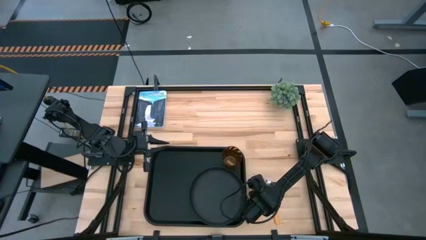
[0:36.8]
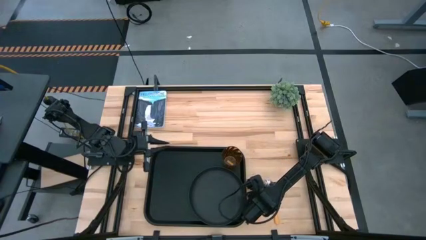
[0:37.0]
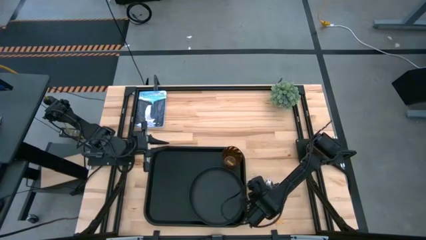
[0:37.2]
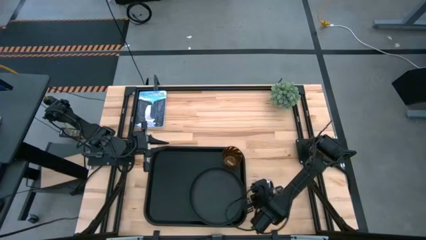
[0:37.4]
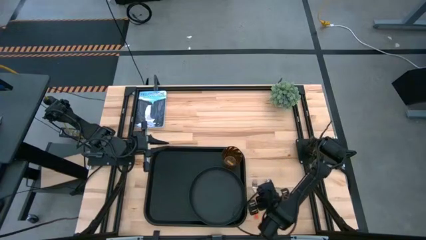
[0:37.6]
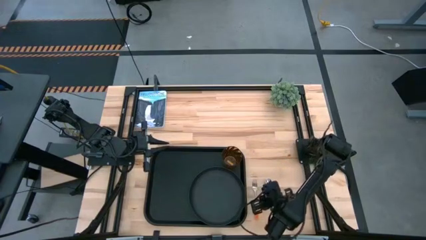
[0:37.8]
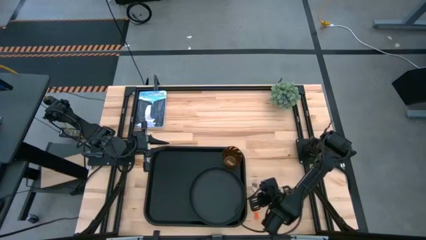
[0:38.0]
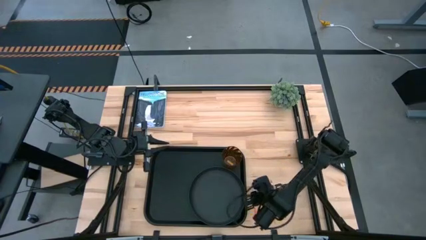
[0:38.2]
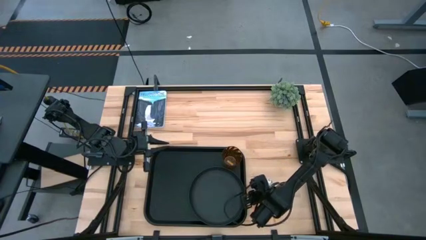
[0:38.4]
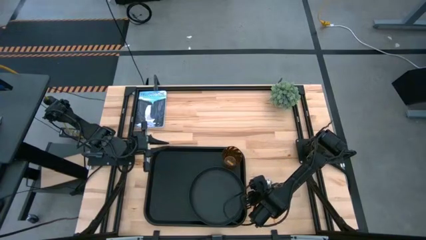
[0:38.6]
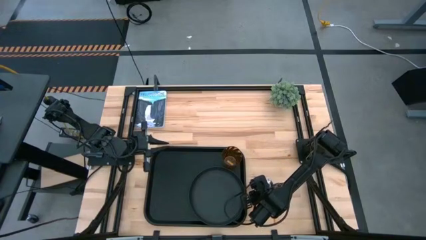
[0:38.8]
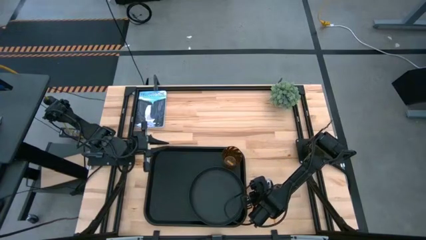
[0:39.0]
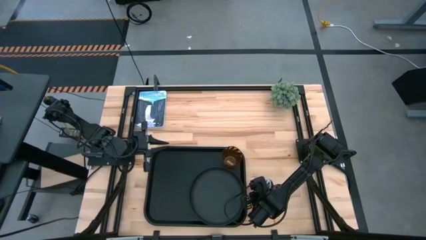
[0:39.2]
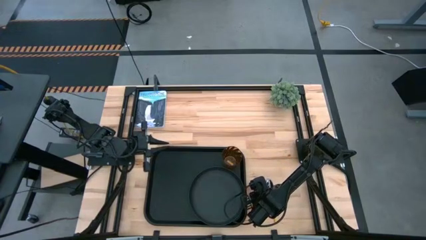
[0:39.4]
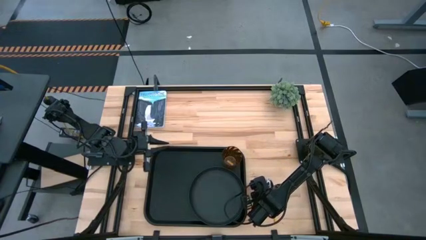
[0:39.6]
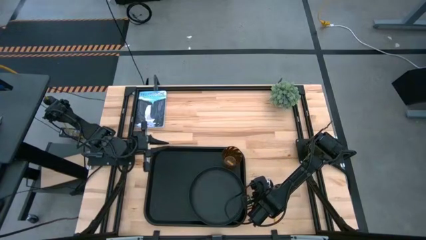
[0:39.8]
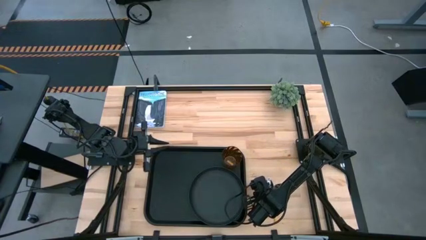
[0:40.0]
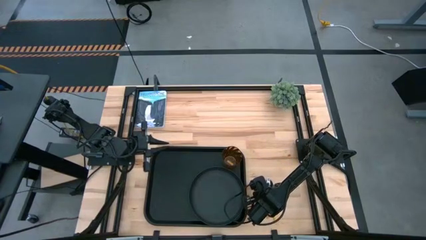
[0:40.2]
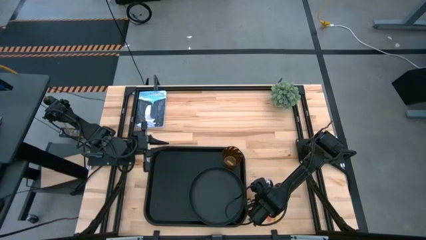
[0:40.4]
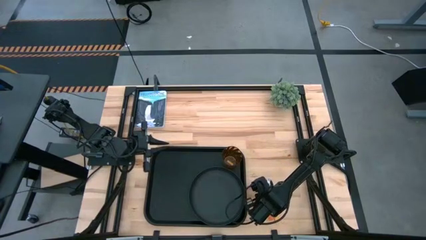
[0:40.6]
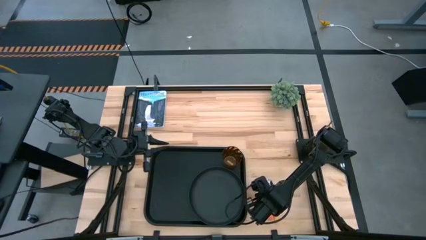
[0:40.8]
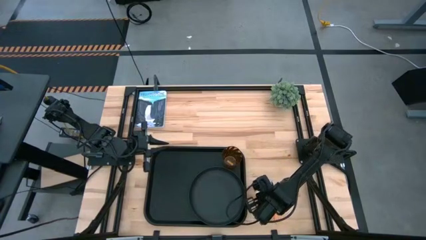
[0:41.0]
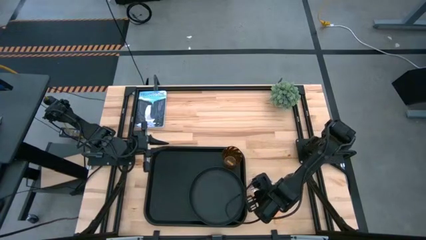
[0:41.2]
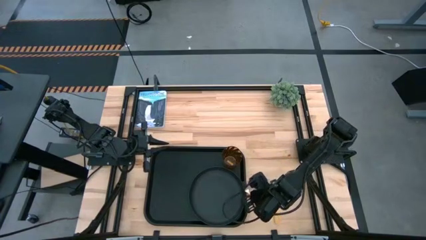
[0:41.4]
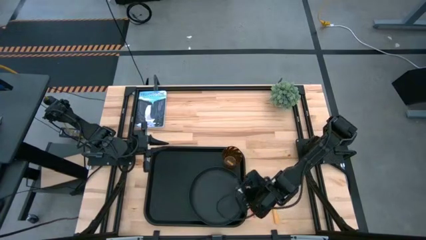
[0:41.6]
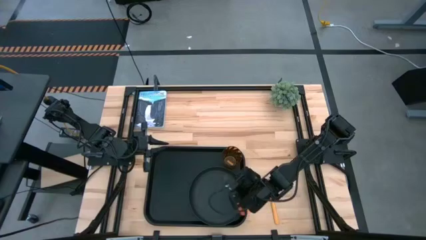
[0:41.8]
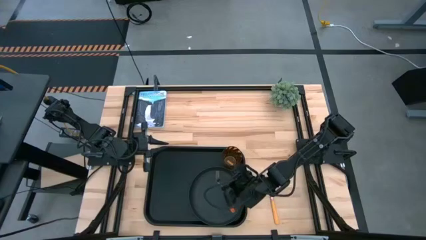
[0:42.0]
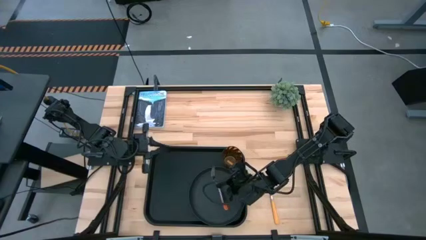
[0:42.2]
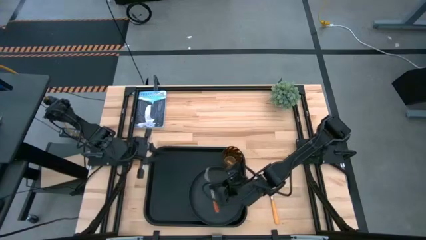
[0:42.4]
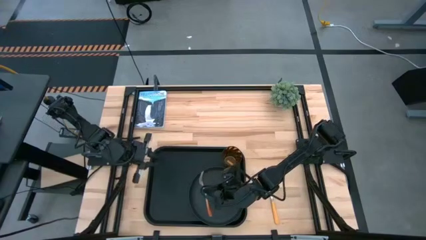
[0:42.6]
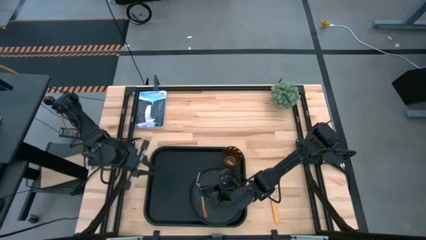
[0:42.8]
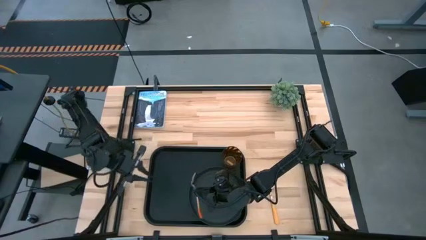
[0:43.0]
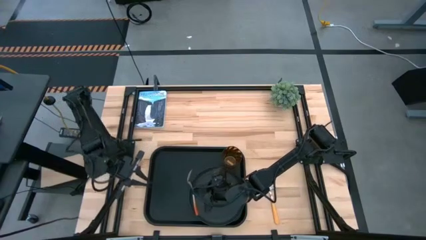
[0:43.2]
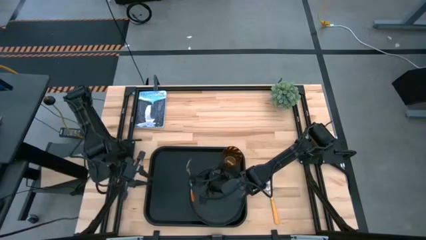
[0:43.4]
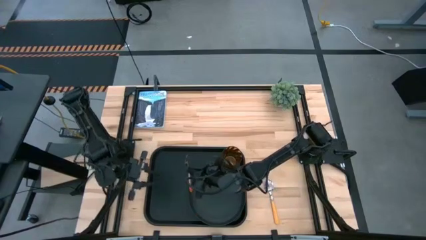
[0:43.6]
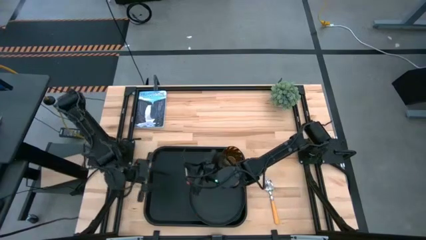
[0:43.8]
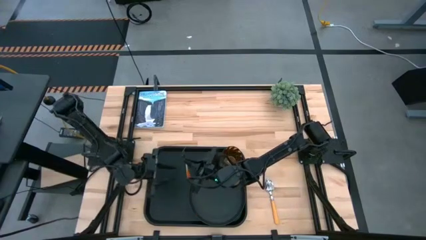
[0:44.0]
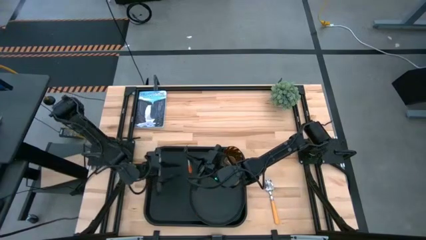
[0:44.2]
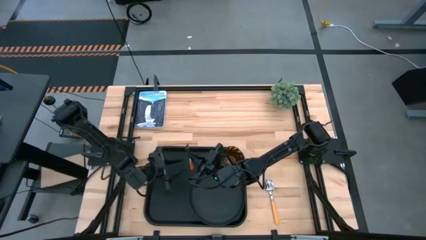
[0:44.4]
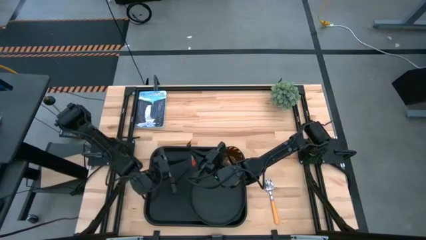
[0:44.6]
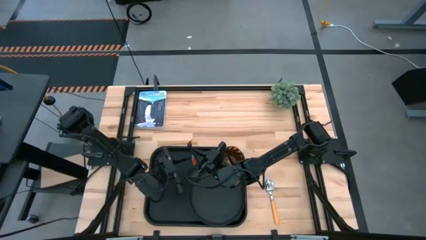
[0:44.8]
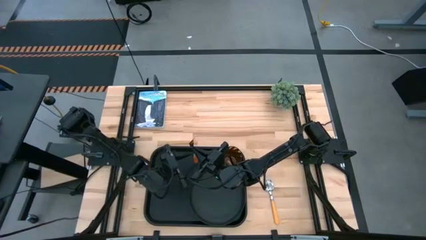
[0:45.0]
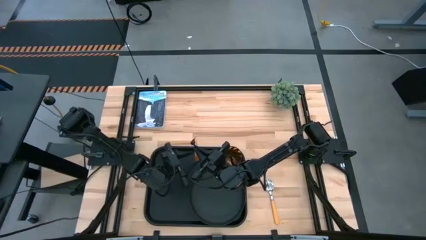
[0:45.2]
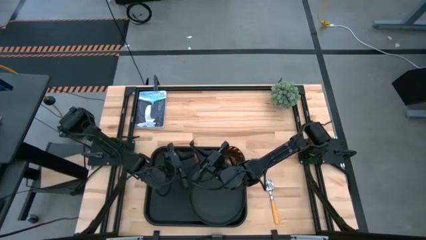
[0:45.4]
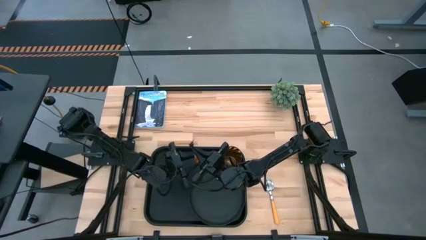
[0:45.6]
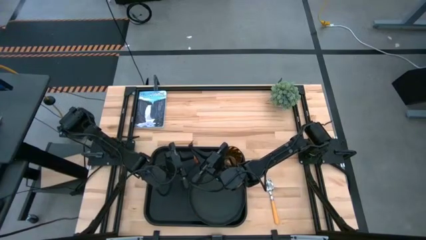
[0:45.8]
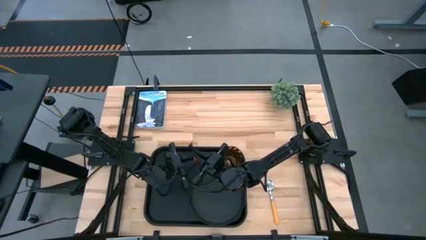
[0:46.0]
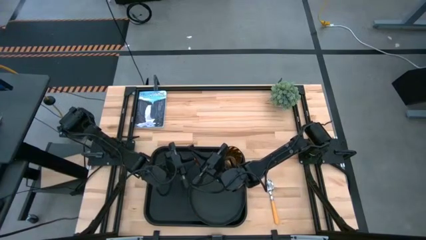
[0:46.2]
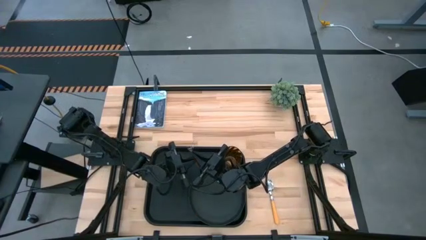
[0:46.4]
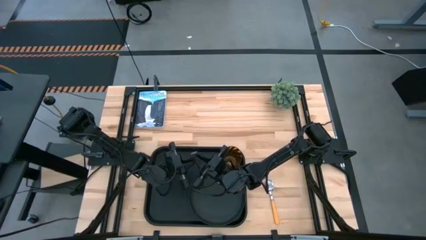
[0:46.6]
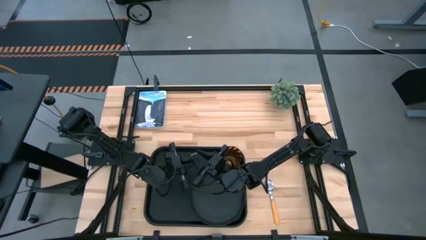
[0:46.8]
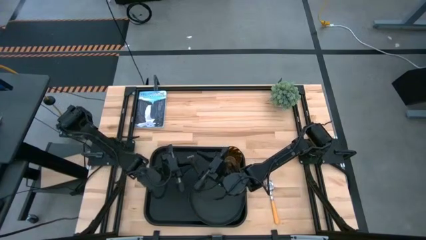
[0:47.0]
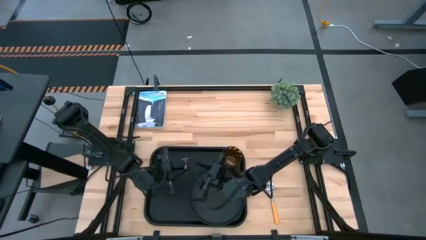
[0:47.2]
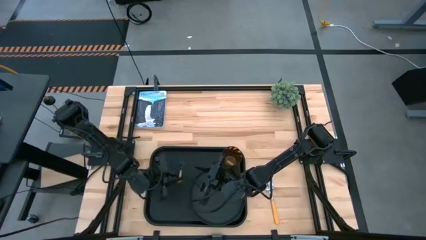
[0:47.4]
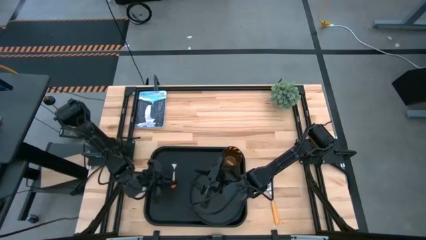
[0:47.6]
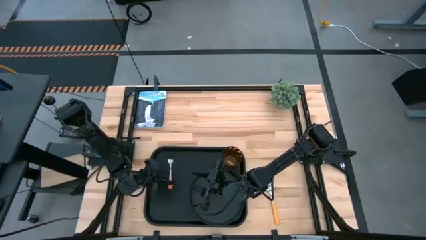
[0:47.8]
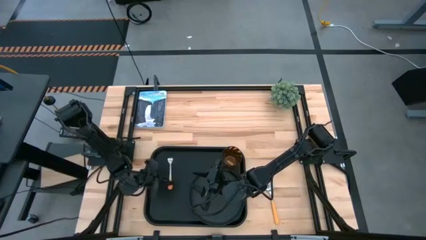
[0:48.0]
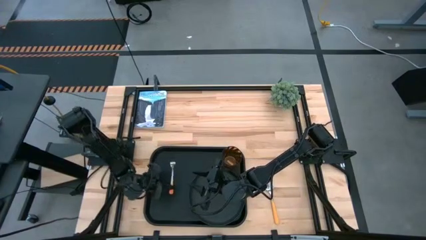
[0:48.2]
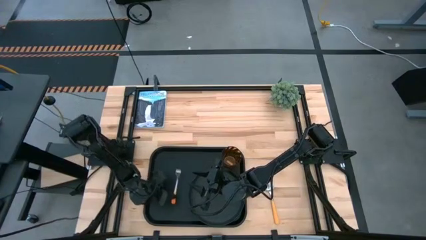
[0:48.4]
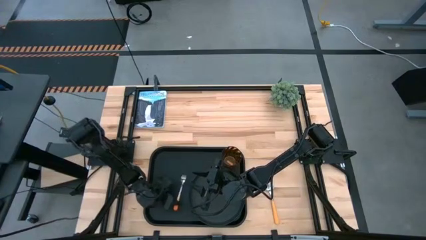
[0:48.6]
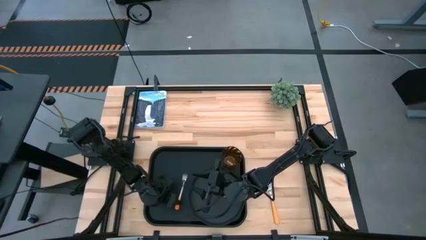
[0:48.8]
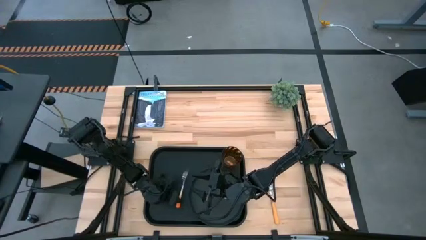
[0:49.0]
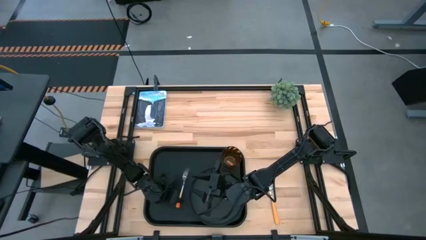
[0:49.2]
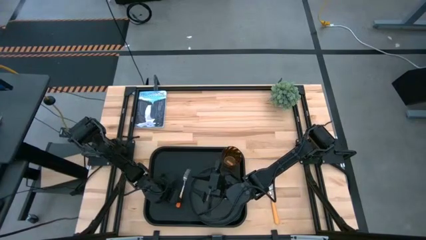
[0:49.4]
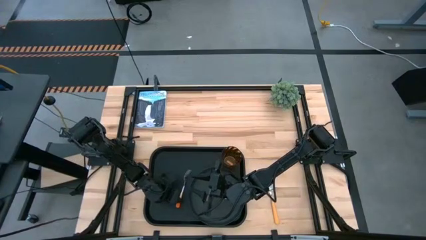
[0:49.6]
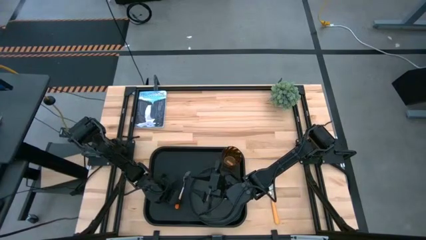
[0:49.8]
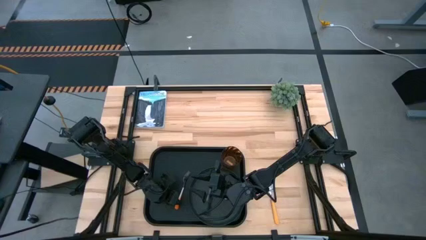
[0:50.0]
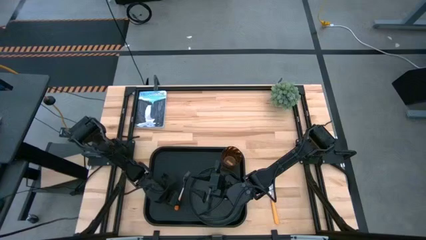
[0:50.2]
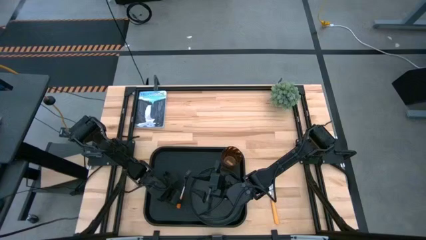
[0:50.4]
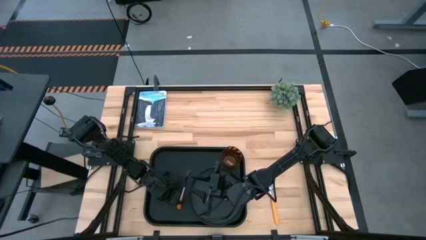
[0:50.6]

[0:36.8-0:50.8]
Task: Pick and place plate/cup/fork/spoon on tray
Put the orange fork to the left of the black plate on the black tray

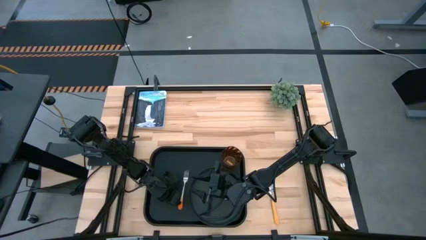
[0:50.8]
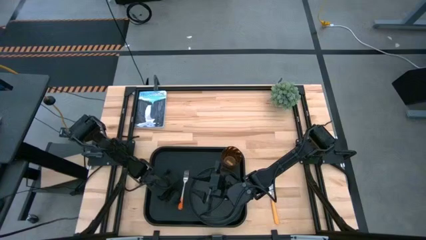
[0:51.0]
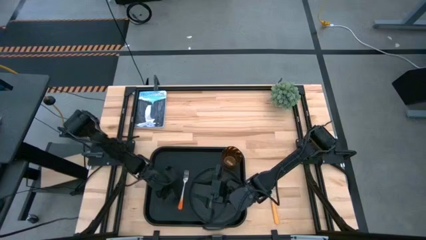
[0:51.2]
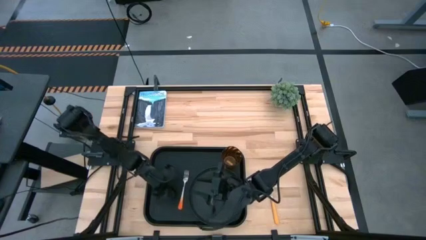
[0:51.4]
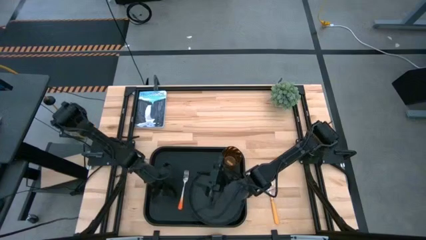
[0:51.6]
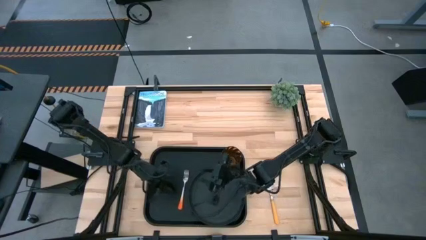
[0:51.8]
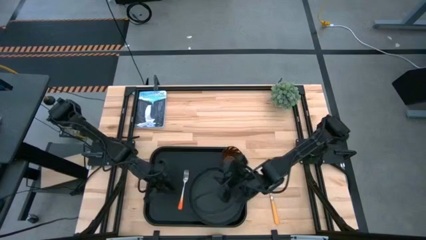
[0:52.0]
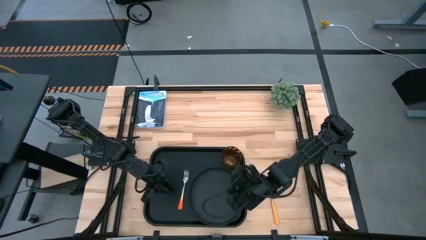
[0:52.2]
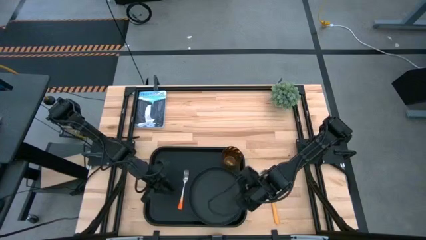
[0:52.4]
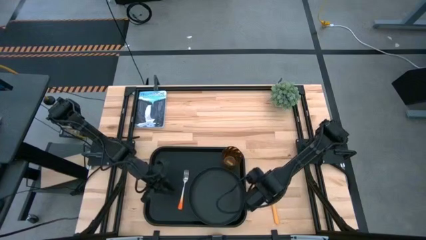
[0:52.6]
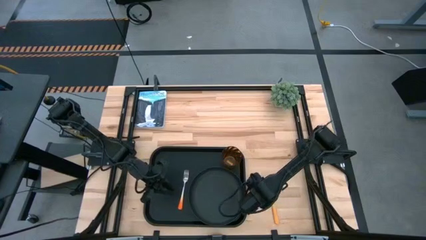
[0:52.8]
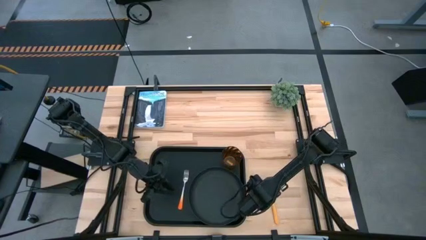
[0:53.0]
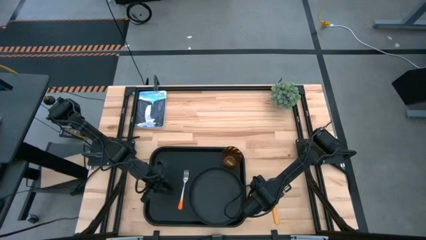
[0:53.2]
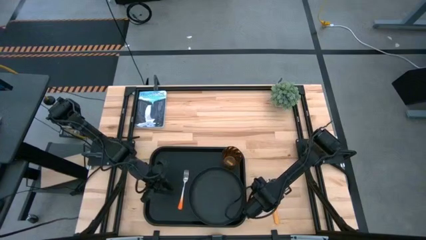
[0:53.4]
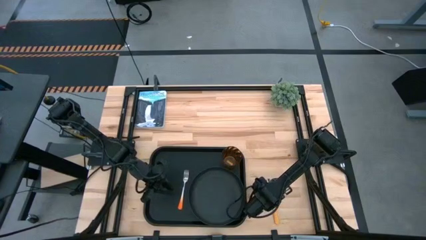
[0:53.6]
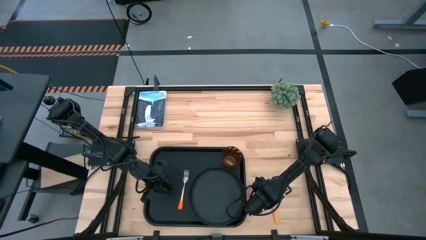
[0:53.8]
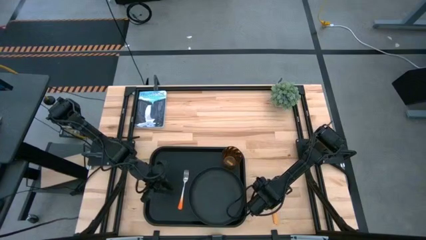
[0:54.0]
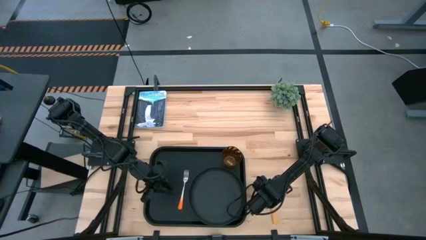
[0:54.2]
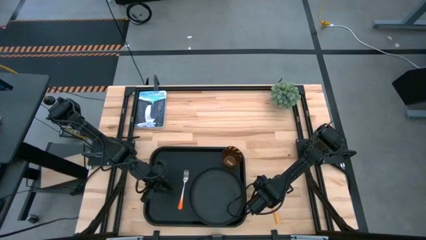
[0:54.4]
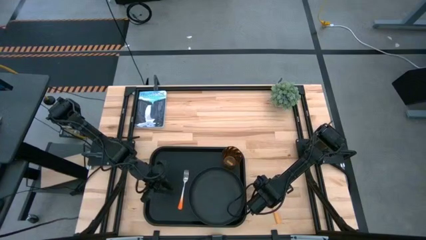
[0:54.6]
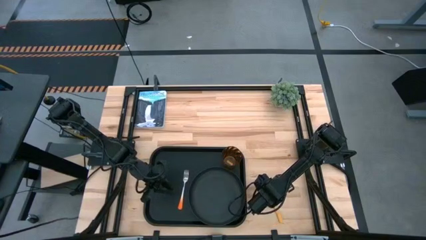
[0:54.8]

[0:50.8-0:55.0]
Put the yellow spoon to the left of the orange fork on the black tray
